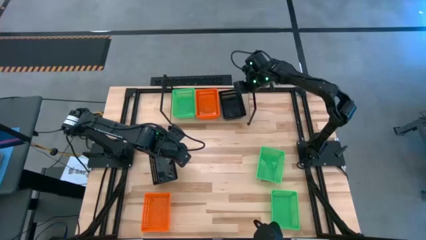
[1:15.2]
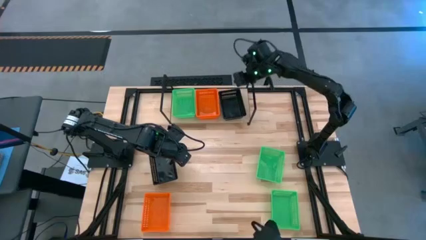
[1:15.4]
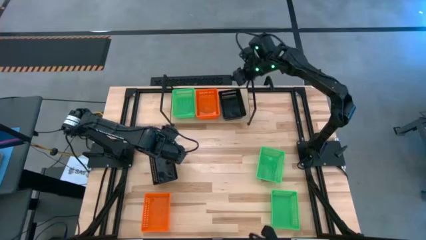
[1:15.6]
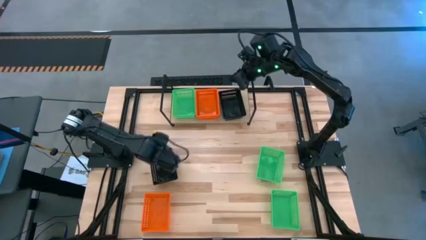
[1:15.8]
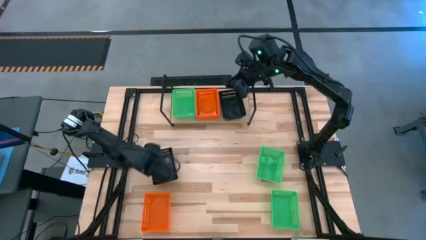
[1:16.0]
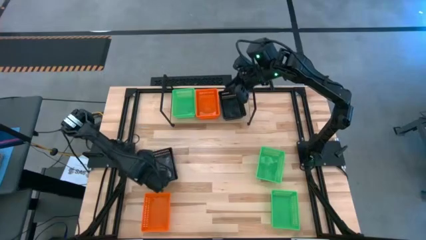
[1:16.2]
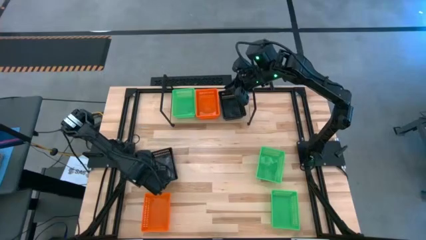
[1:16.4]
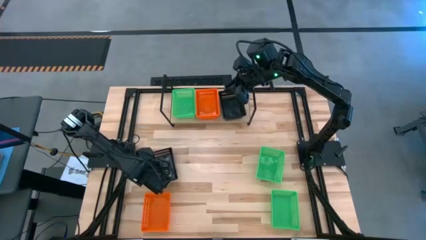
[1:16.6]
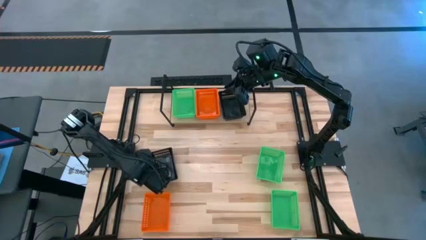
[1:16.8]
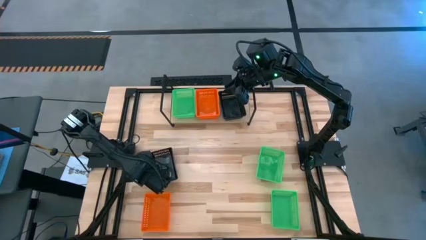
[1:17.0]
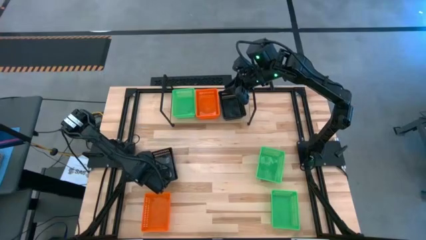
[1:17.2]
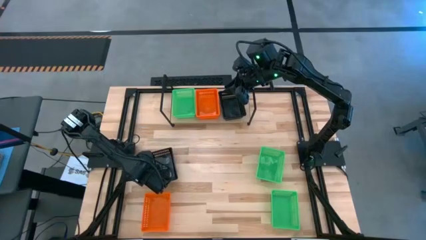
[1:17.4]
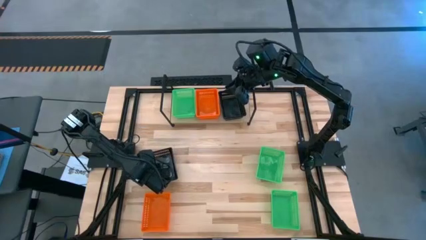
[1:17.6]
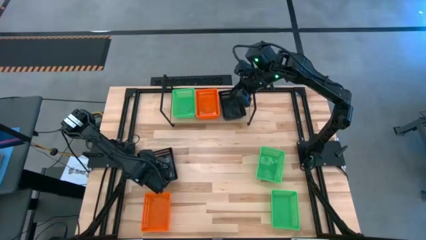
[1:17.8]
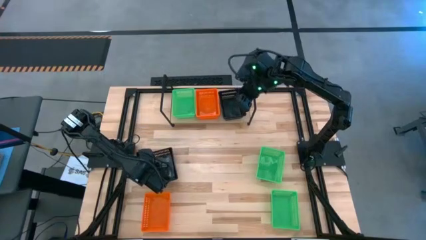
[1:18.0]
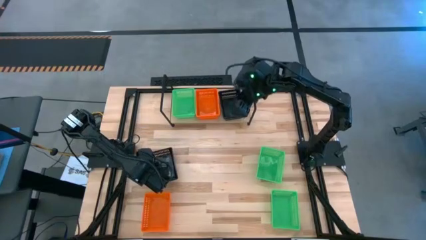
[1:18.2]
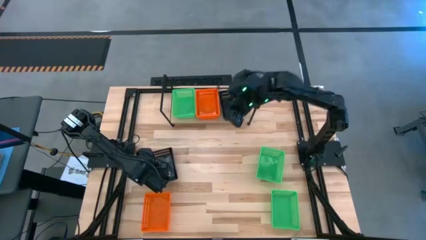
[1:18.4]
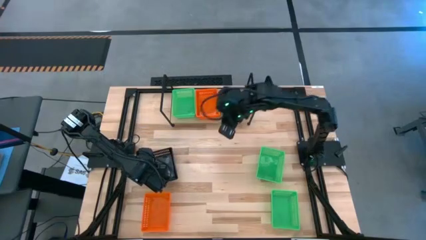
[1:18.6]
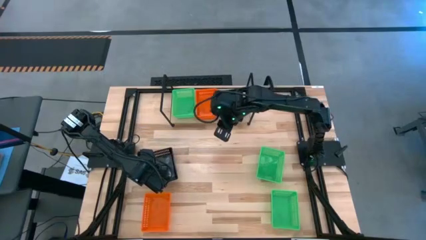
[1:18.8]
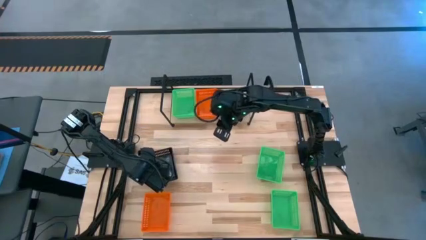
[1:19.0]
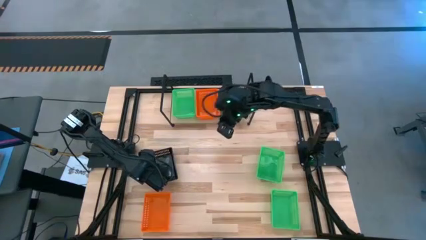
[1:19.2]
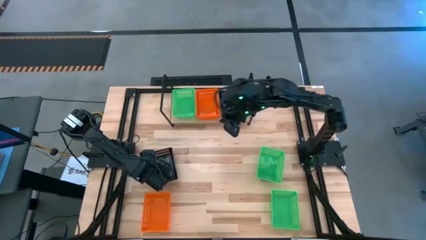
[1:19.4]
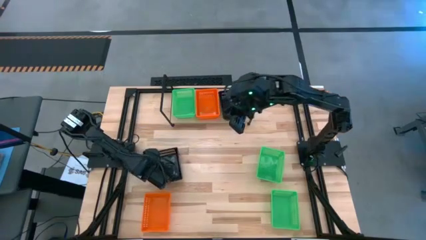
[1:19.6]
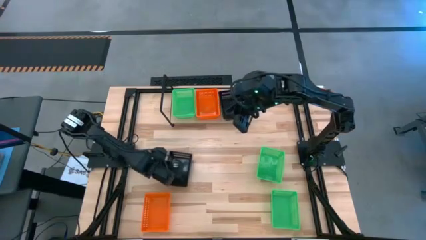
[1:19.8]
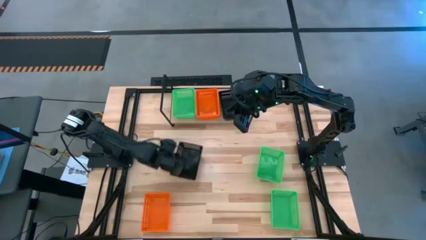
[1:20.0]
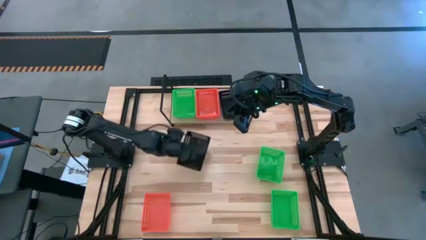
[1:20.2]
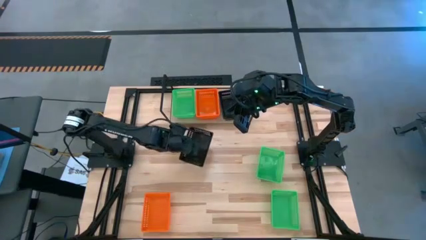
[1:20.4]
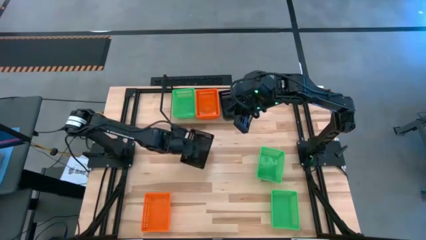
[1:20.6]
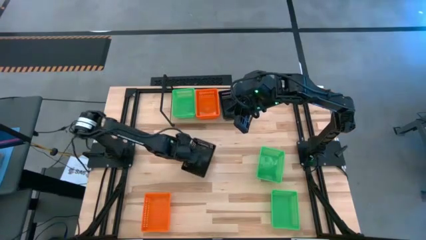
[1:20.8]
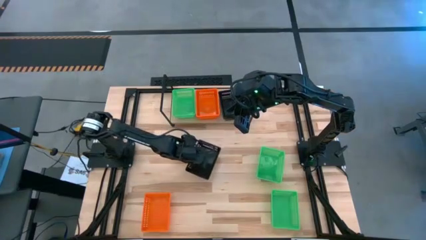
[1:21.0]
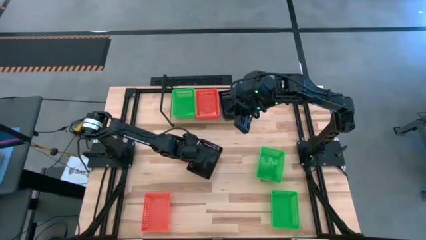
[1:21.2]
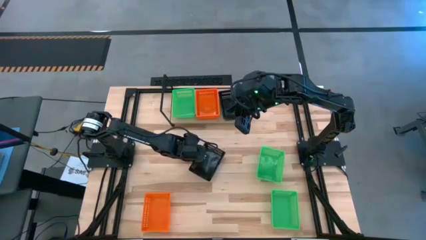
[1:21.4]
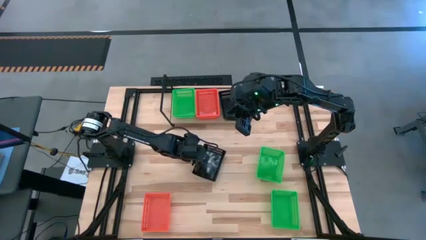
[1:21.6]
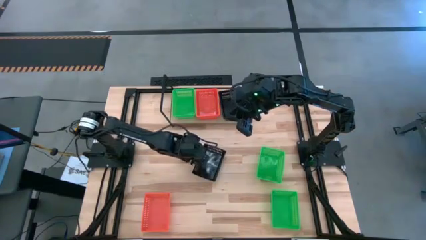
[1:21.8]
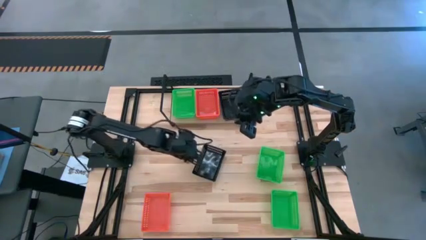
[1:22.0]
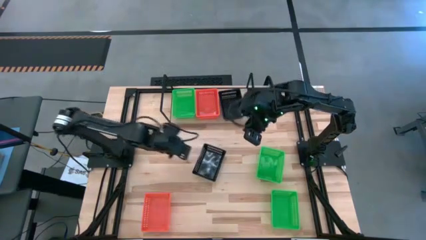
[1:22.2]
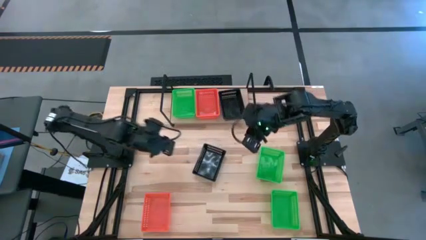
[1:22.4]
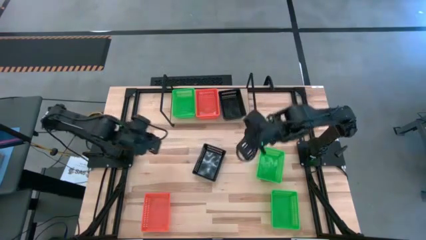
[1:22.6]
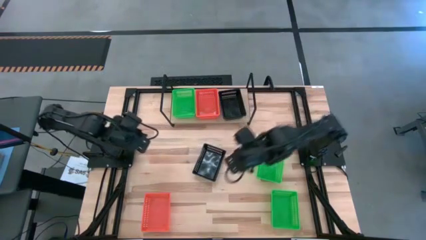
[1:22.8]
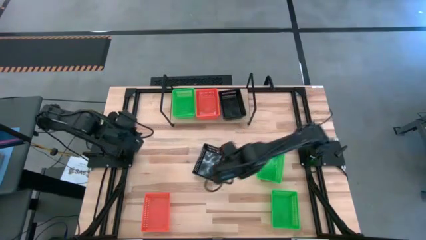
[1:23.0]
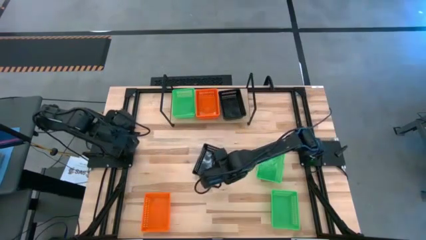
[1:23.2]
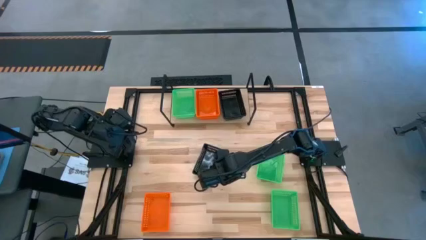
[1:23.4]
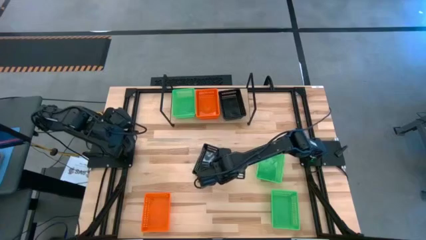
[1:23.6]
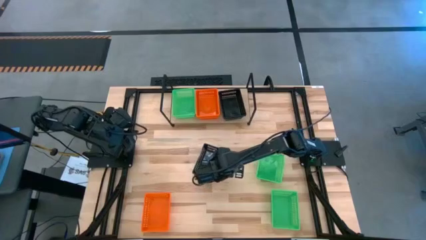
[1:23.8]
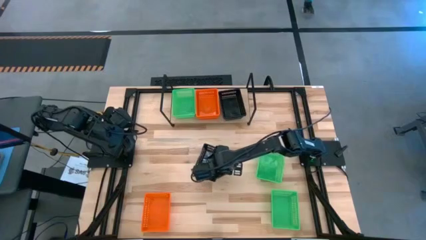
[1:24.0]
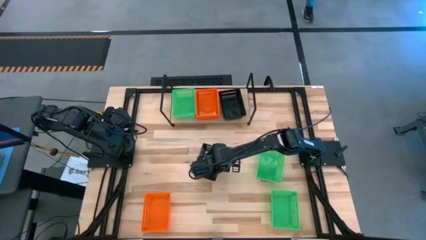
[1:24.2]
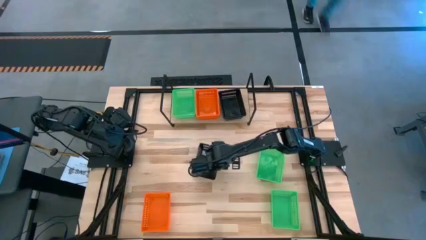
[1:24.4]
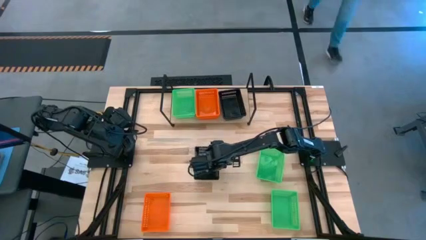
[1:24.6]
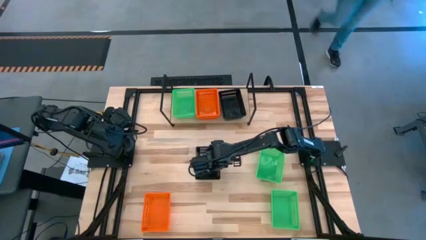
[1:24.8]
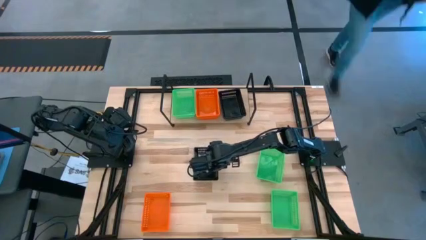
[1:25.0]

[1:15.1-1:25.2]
Task: Stack baskets on shelf by color
Stack the black bin on top of the black bin on the shelf
